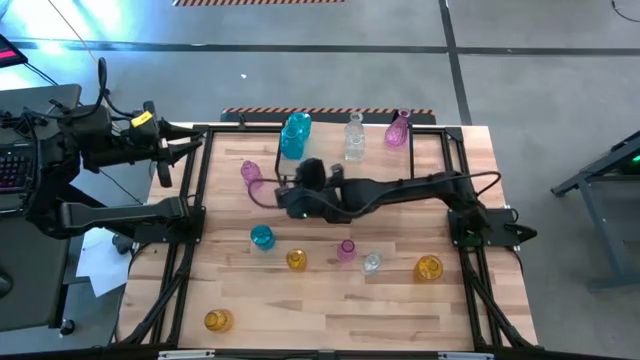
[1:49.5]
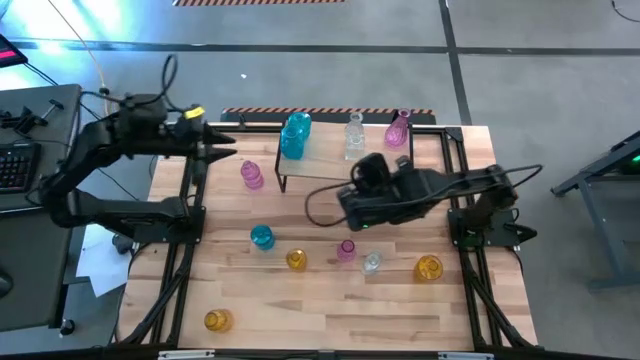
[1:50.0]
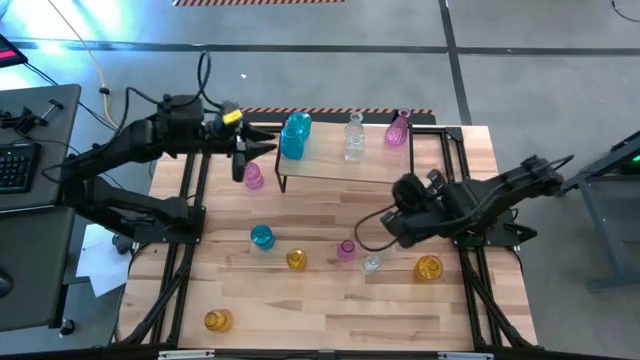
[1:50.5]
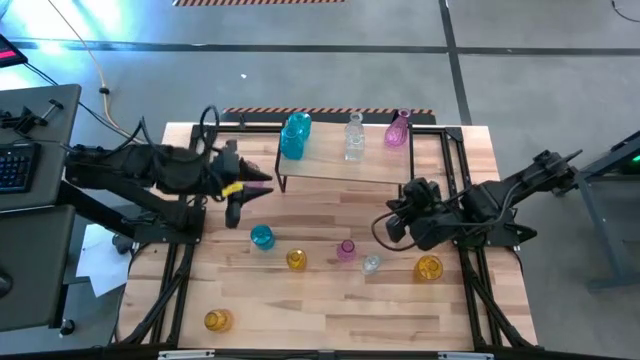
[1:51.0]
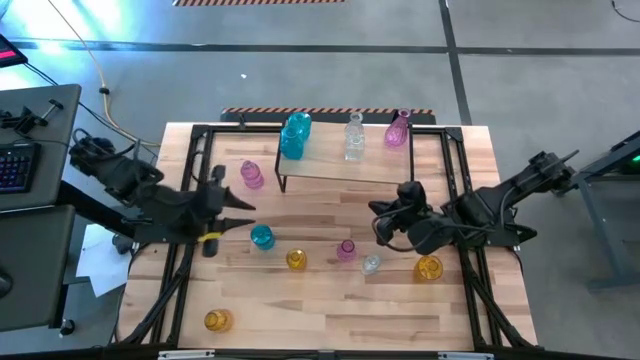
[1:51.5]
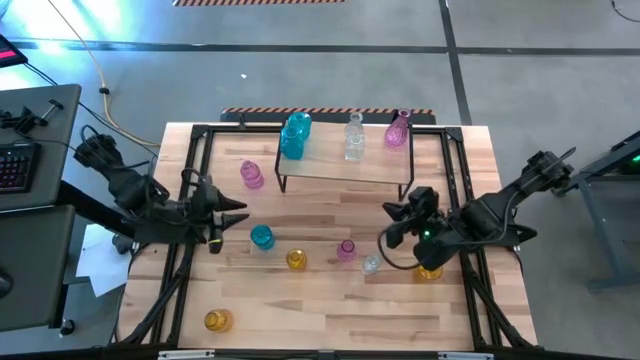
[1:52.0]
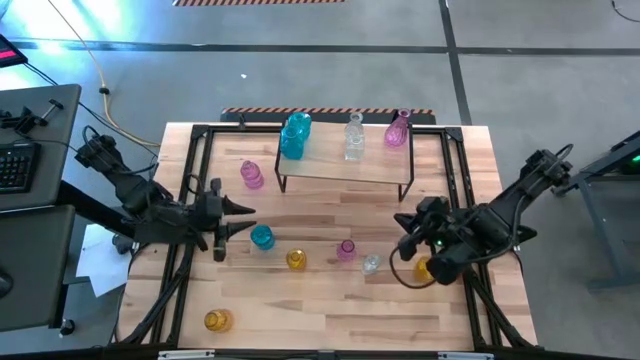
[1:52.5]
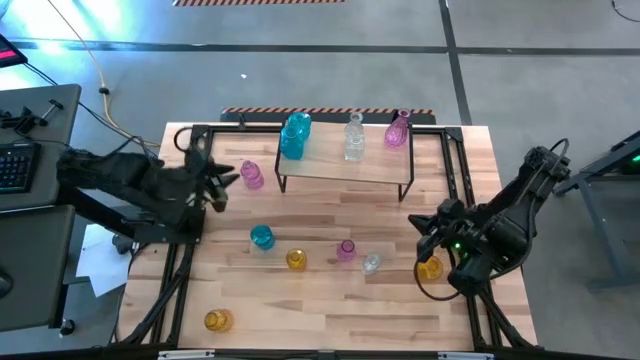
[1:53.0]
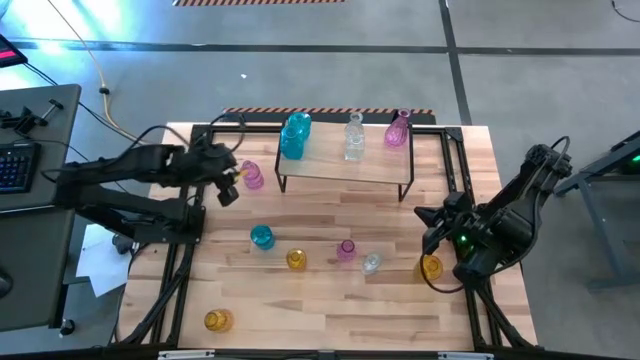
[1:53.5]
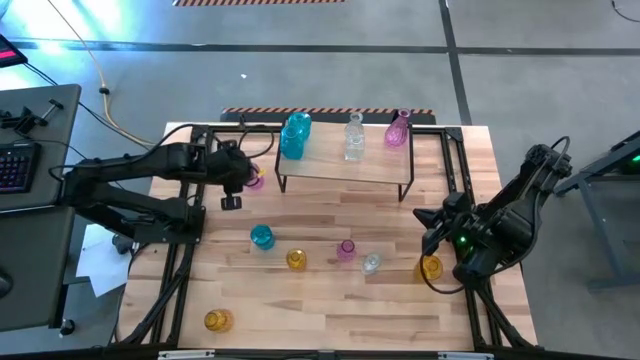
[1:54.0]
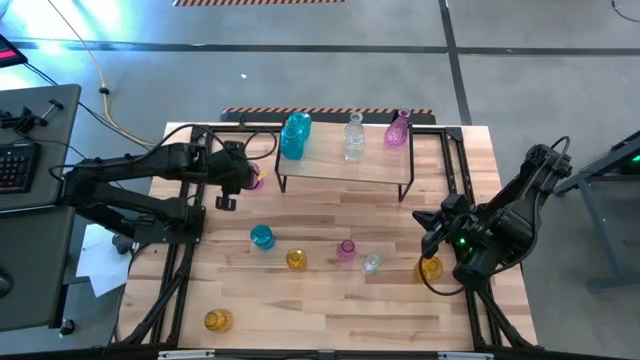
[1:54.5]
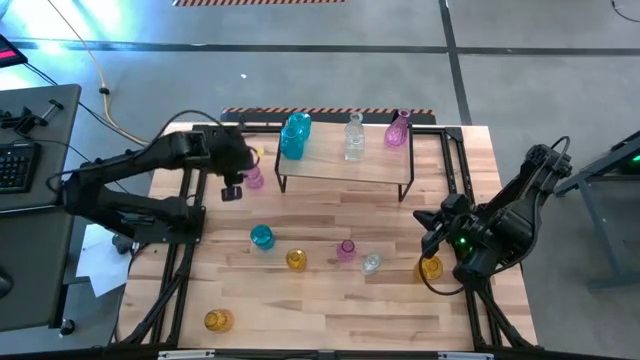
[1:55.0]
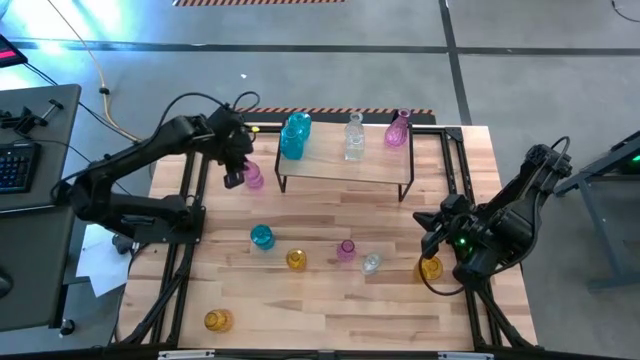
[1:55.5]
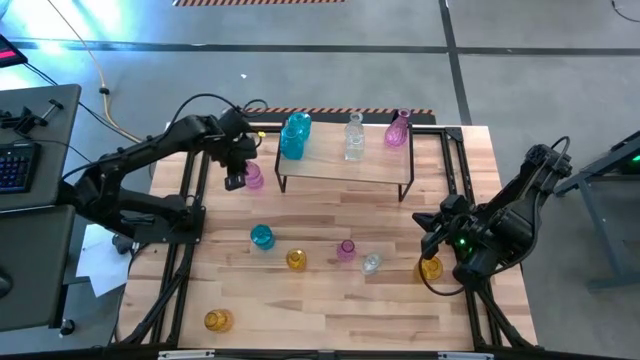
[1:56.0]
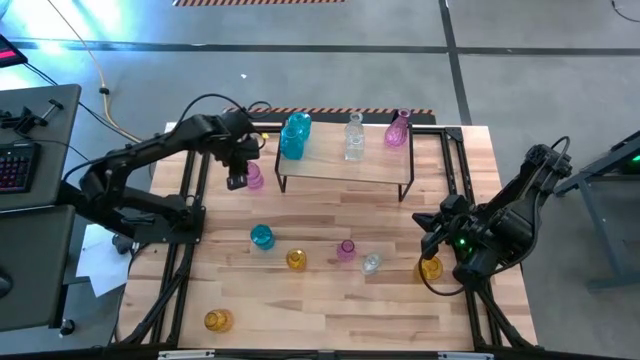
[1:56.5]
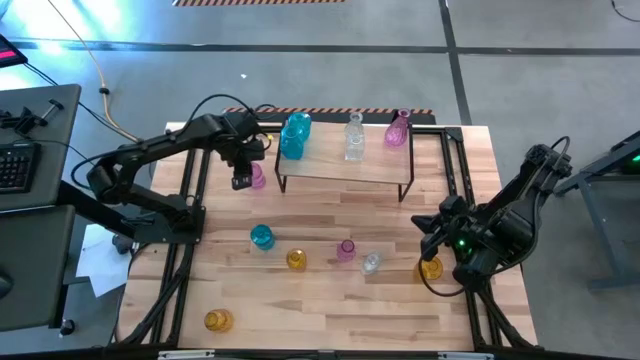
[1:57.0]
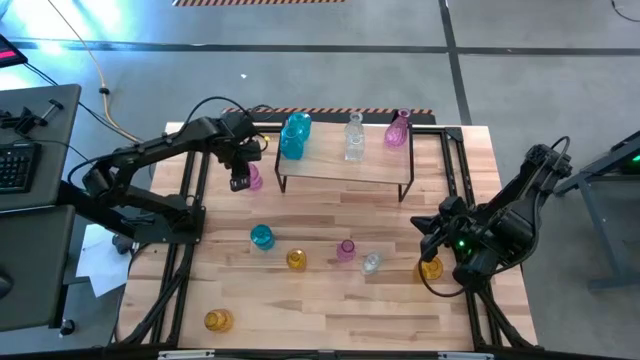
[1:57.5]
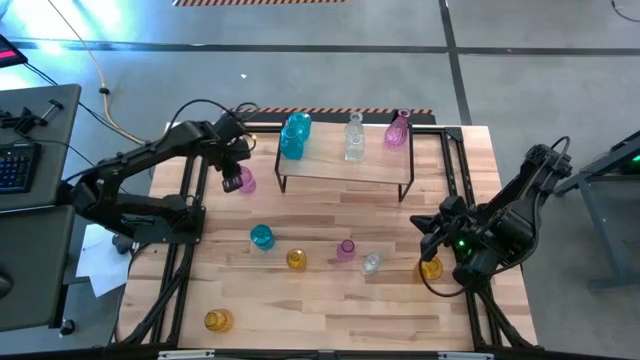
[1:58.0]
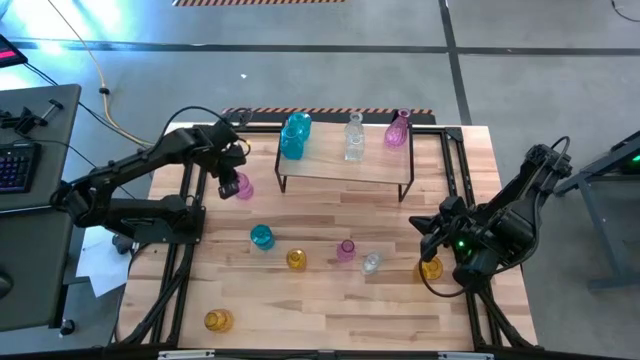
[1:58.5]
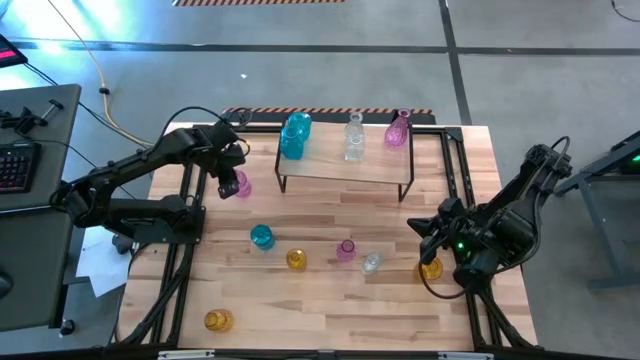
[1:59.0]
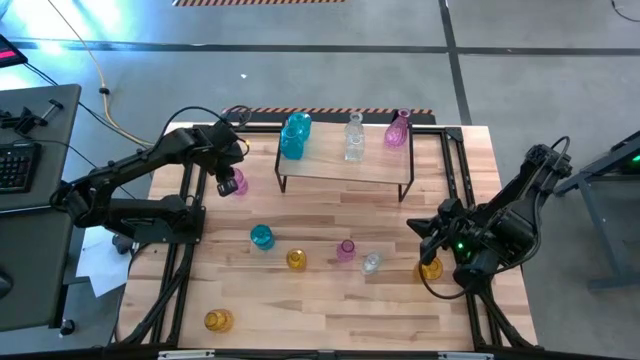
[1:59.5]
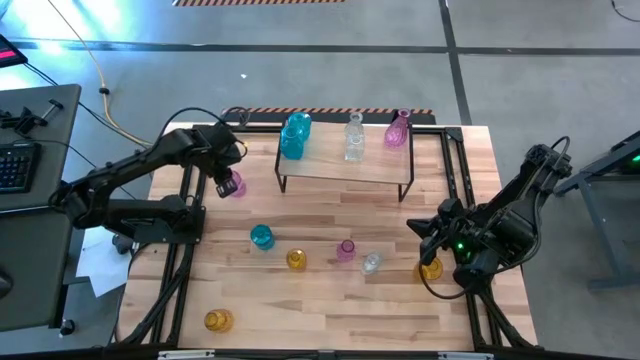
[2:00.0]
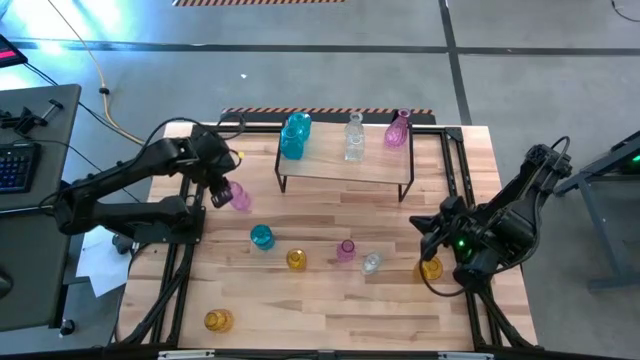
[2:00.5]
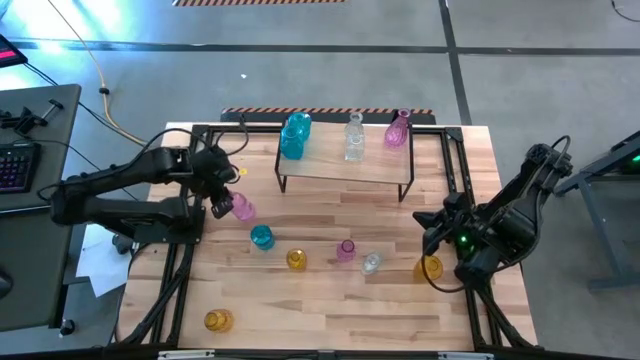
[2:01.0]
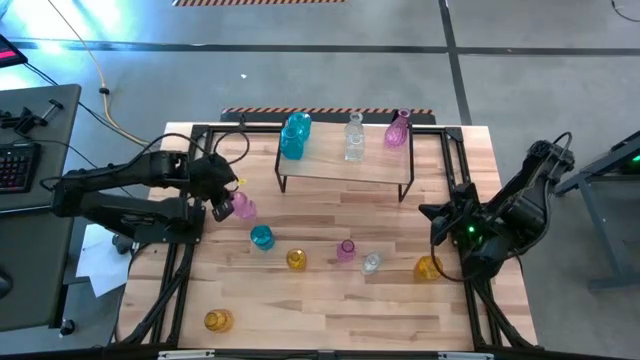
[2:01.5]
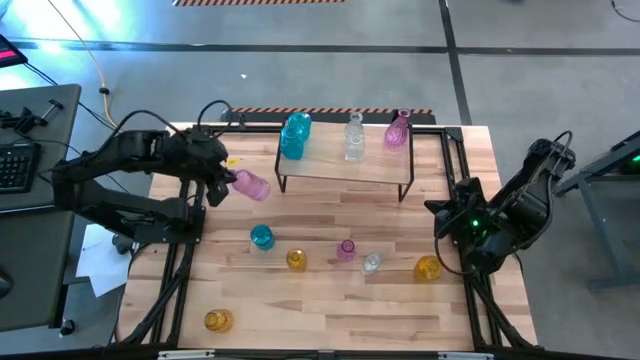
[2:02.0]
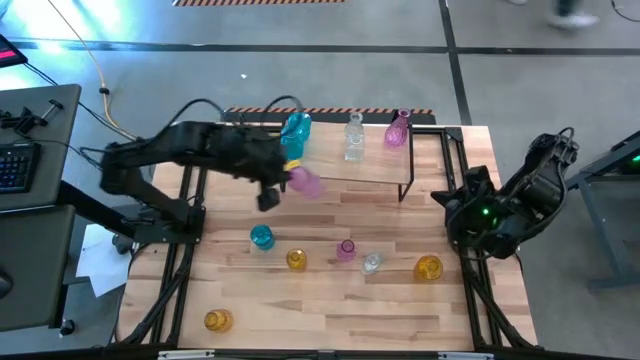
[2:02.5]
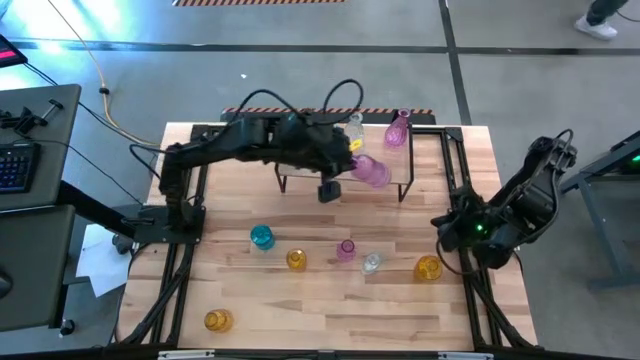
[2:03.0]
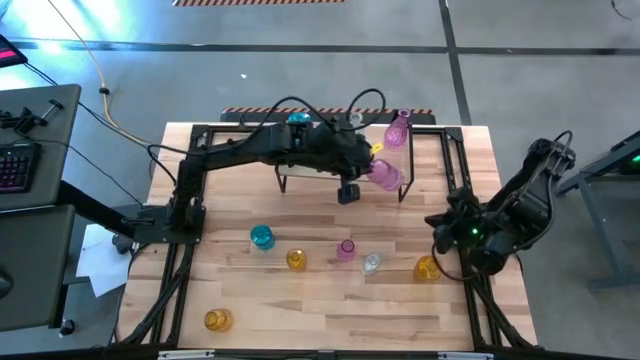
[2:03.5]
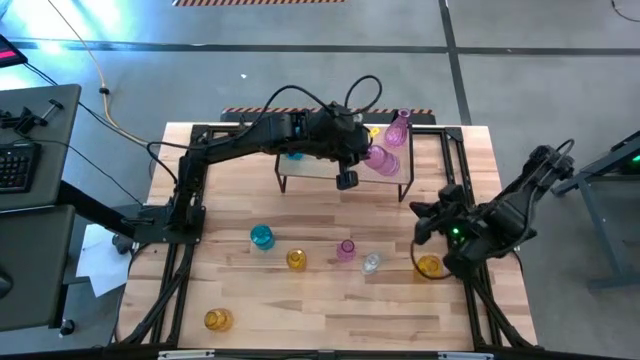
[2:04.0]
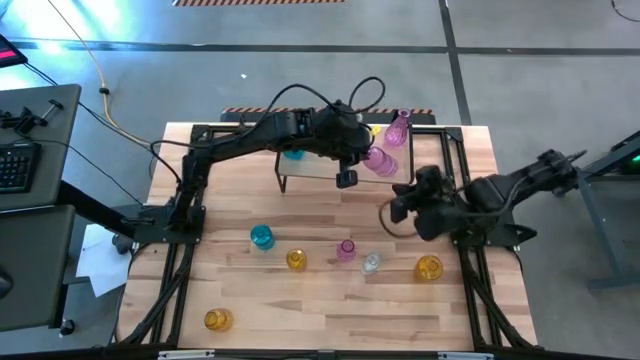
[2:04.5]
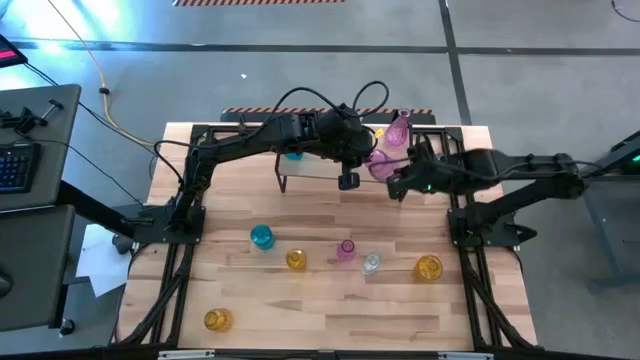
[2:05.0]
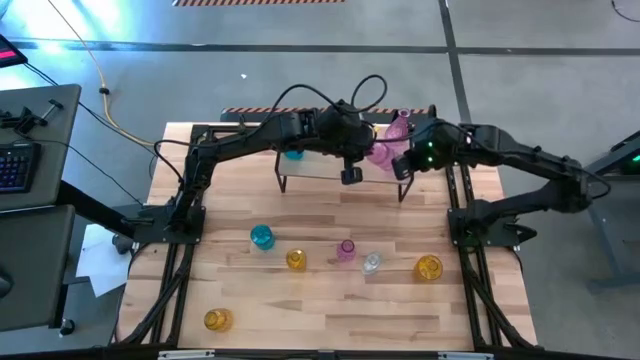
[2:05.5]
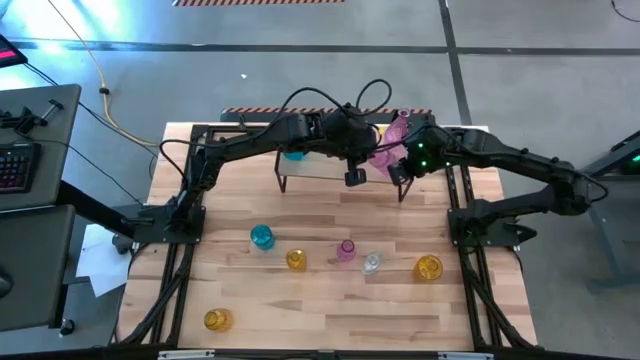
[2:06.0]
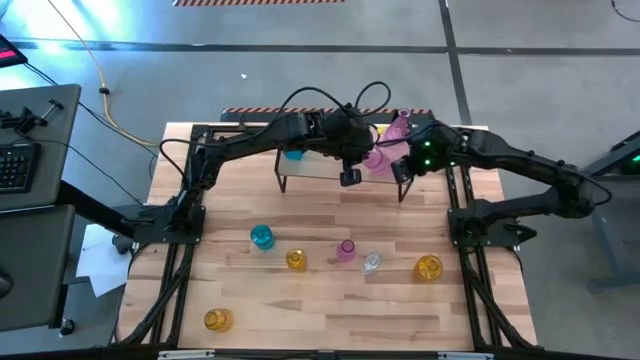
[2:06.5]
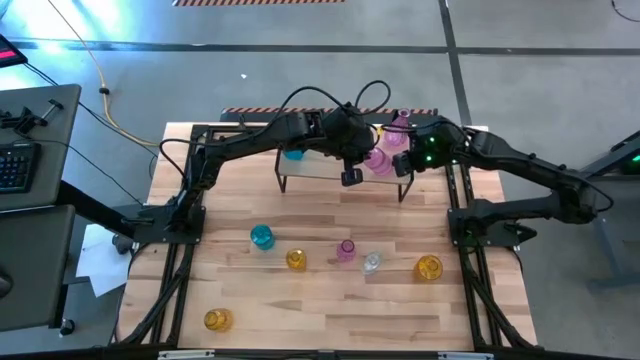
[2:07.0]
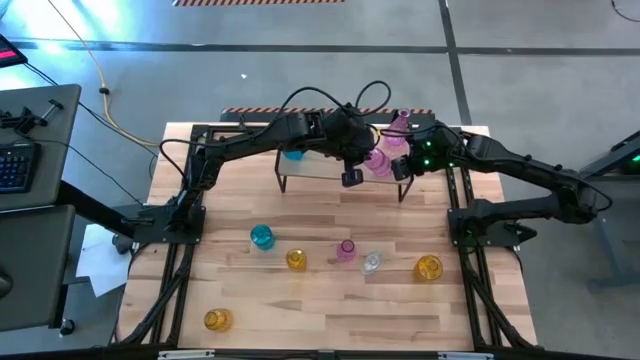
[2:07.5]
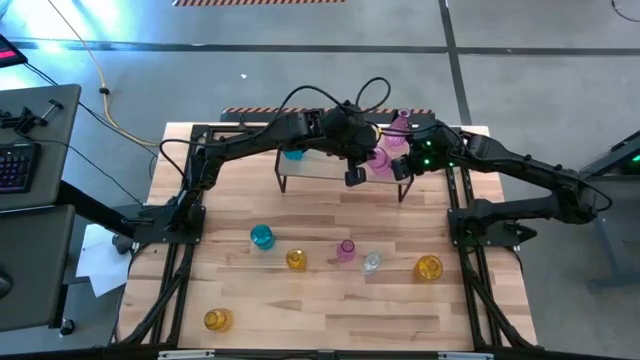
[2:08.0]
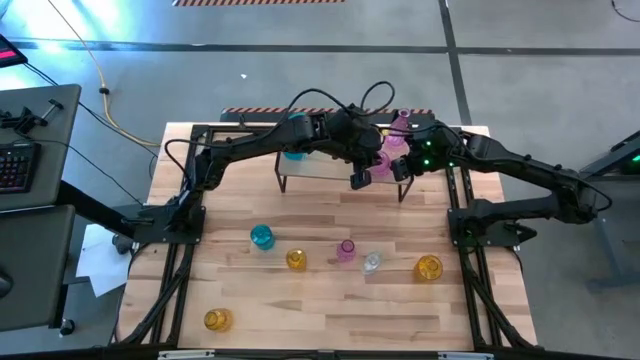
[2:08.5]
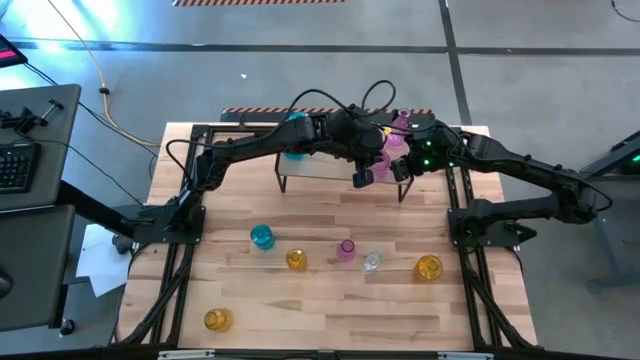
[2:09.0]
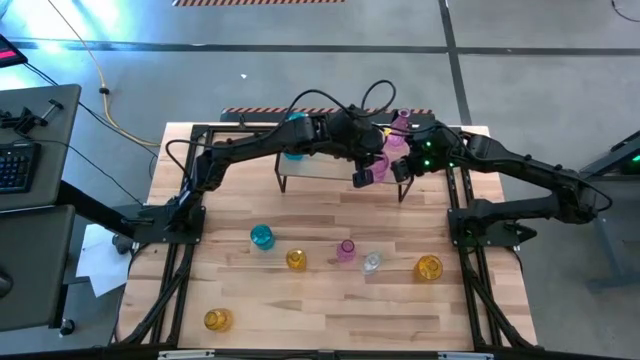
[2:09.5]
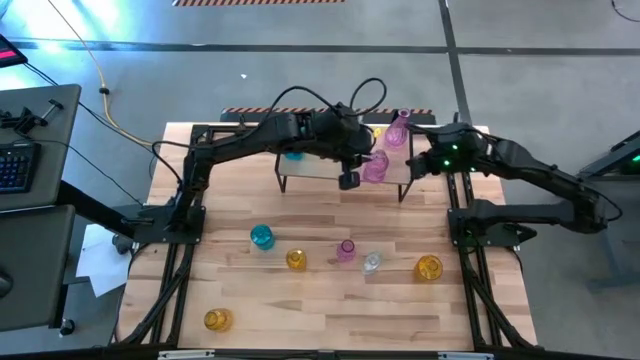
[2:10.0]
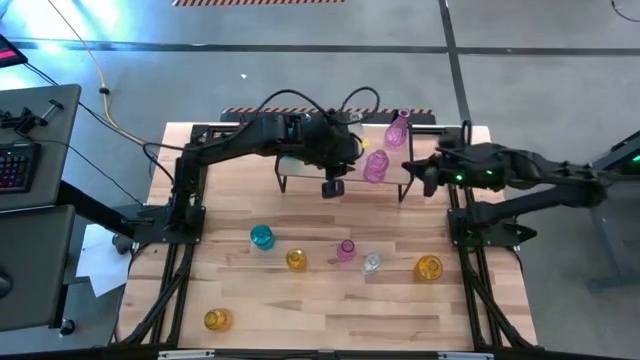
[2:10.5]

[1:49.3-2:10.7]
Task: sort vases onto shelf
Put the top purple vase on the shelf aligned with the other purple vase
